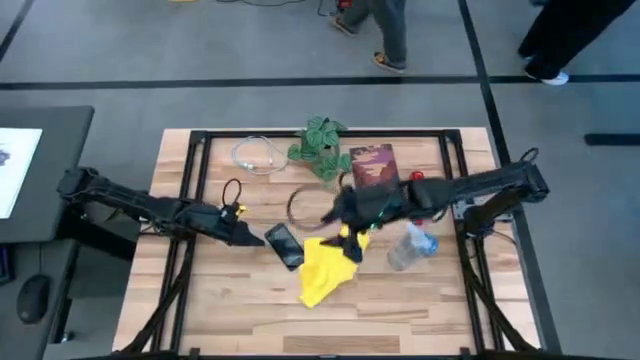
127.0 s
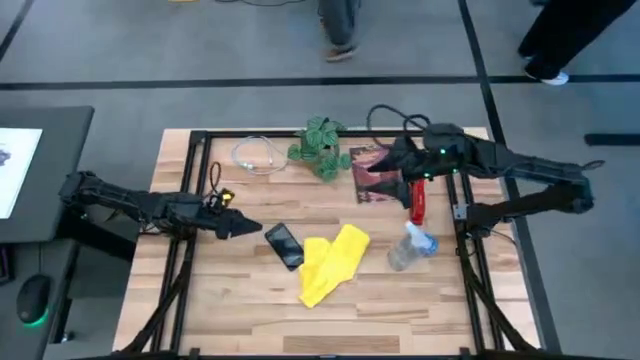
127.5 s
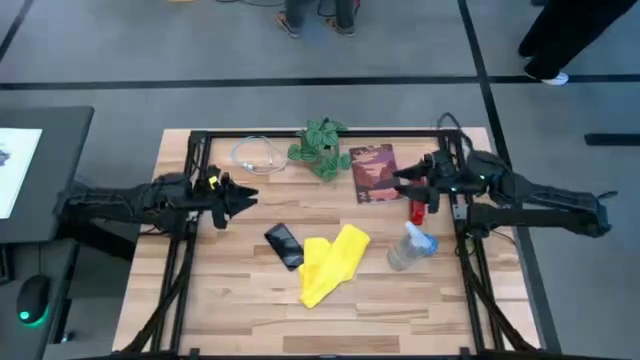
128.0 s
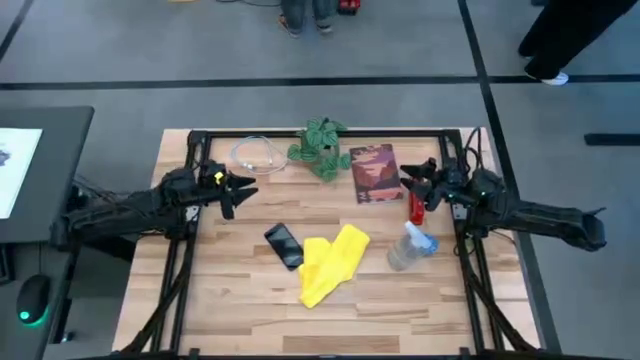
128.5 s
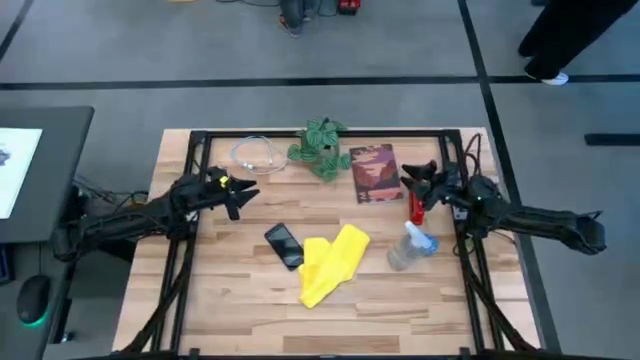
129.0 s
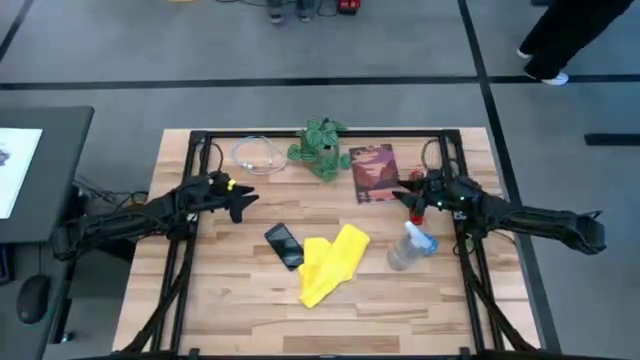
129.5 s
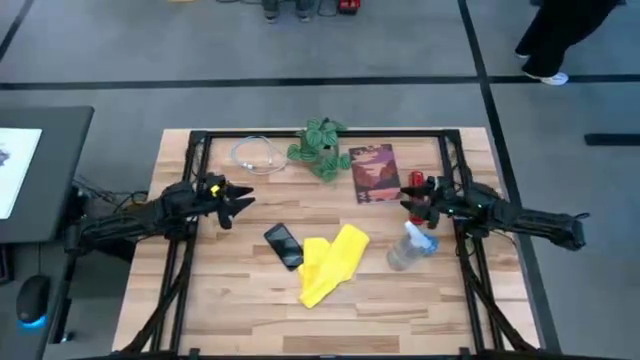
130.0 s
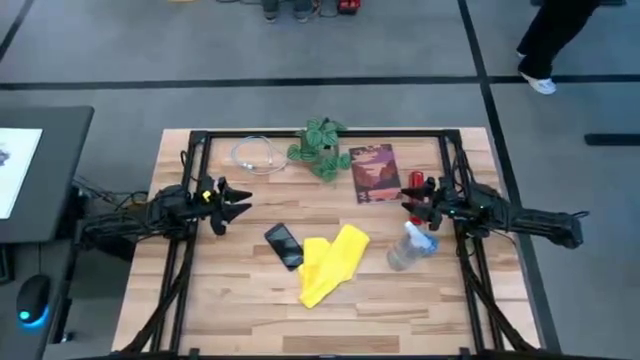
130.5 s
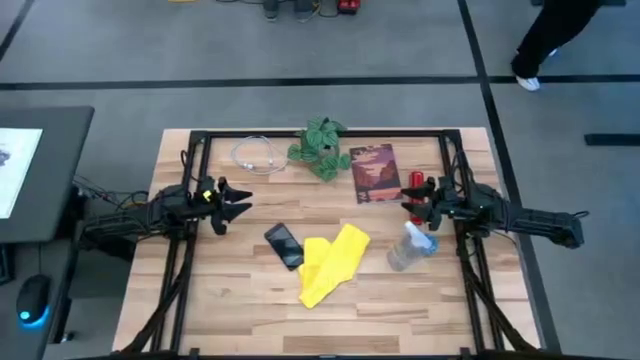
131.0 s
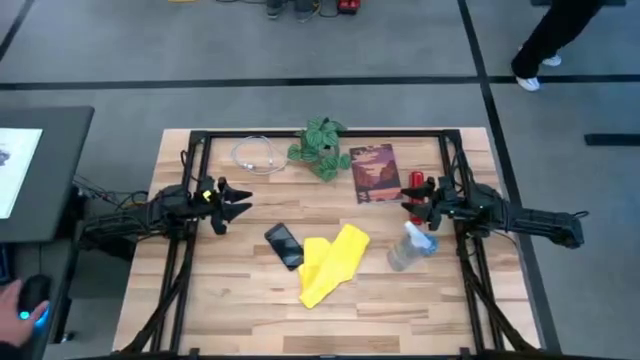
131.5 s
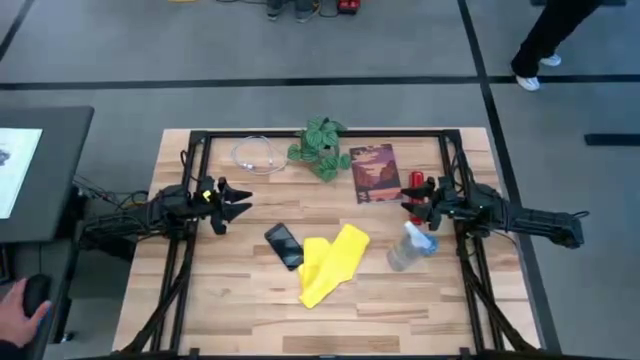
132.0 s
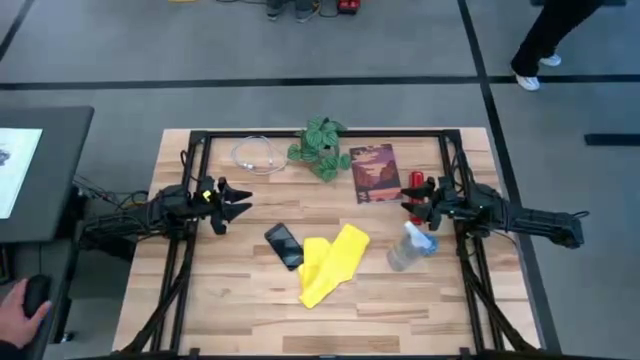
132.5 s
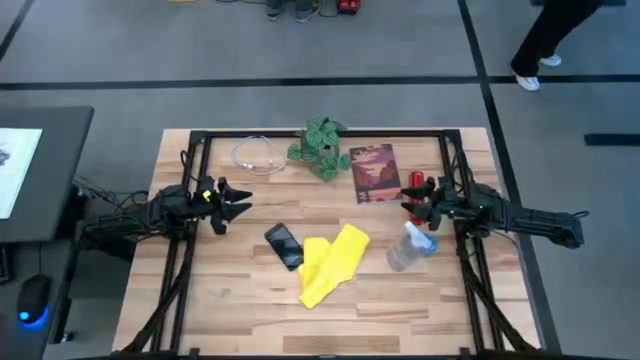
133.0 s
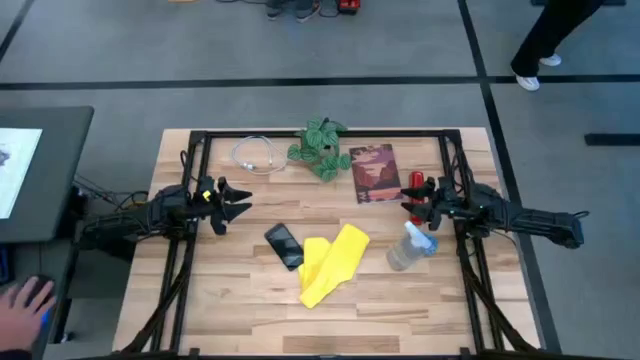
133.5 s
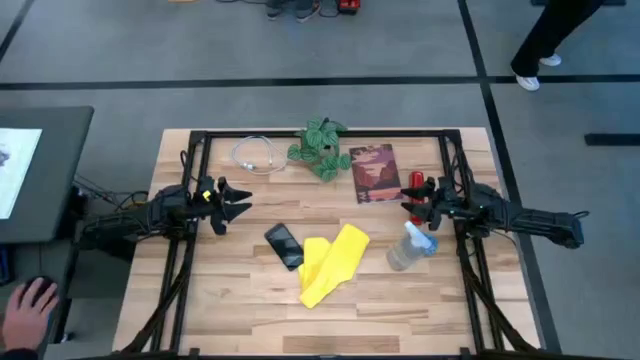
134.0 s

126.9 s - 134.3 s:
Task: Apply microfiber cloth
Return to Home Position

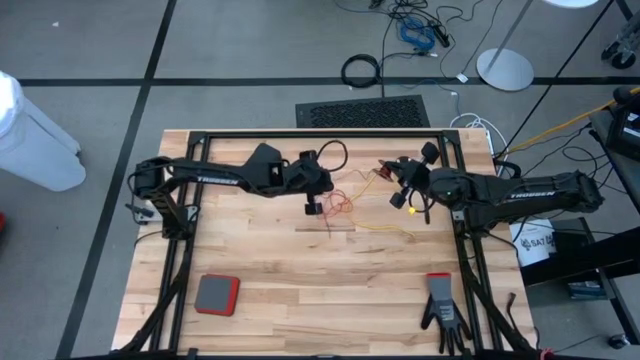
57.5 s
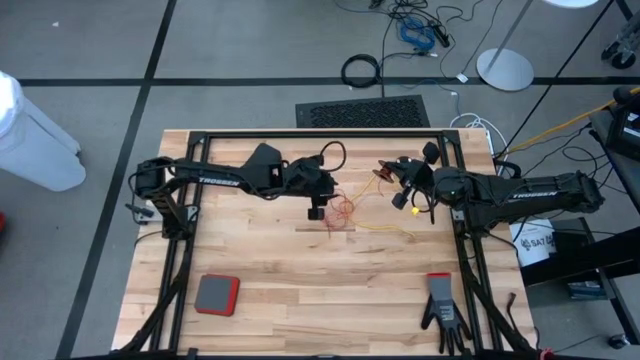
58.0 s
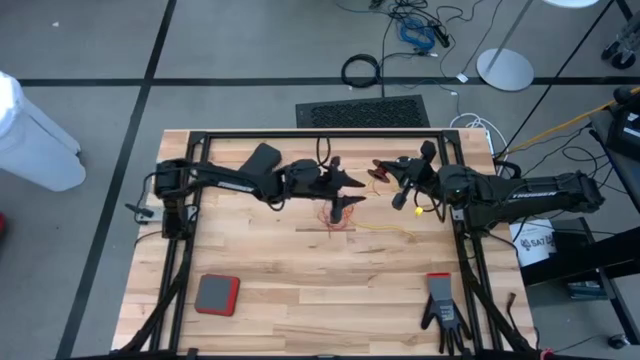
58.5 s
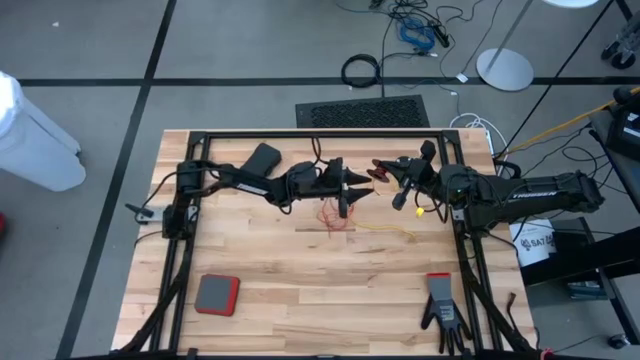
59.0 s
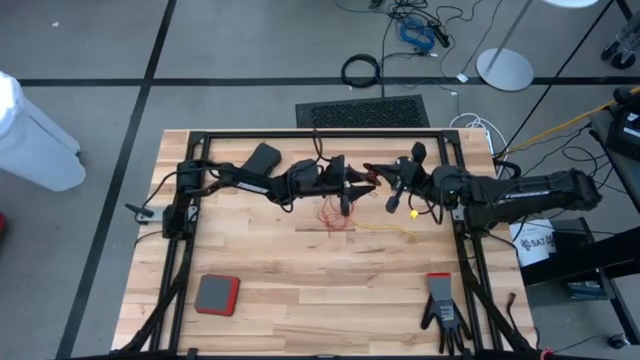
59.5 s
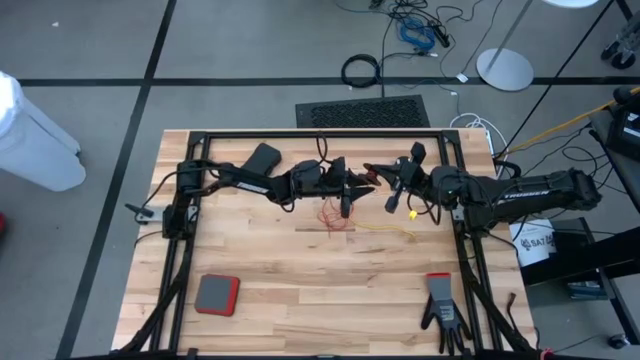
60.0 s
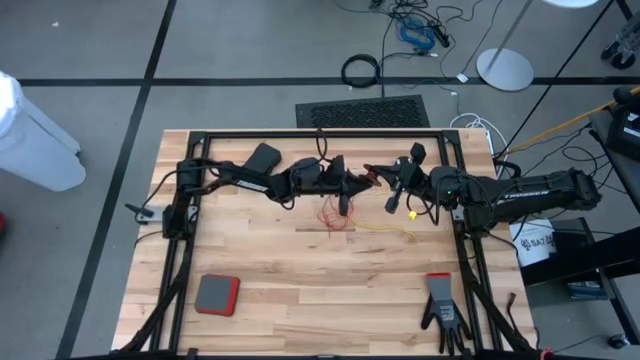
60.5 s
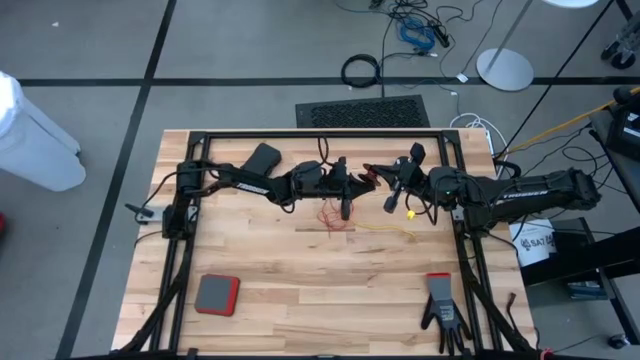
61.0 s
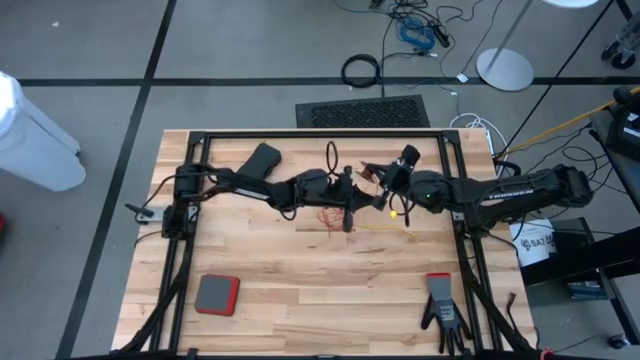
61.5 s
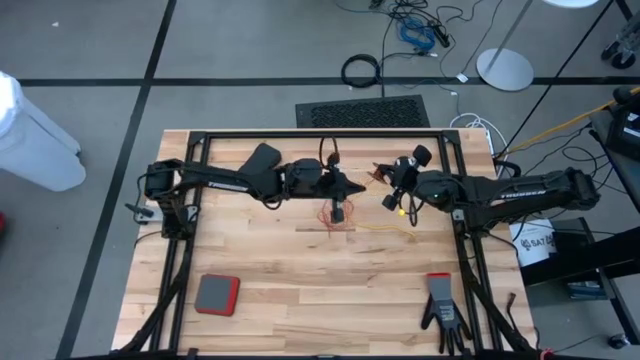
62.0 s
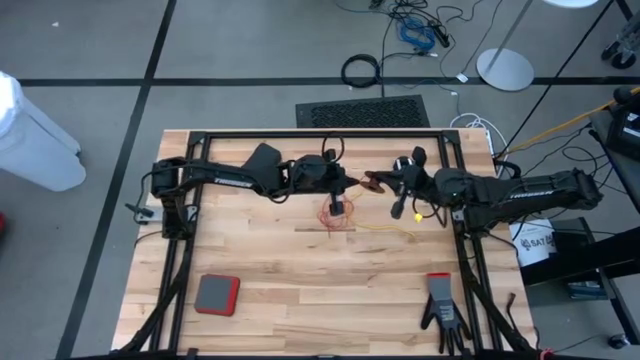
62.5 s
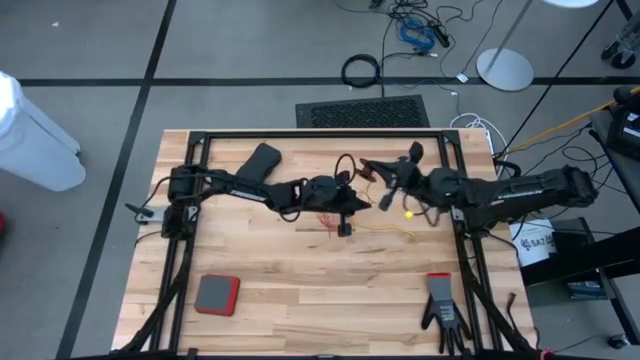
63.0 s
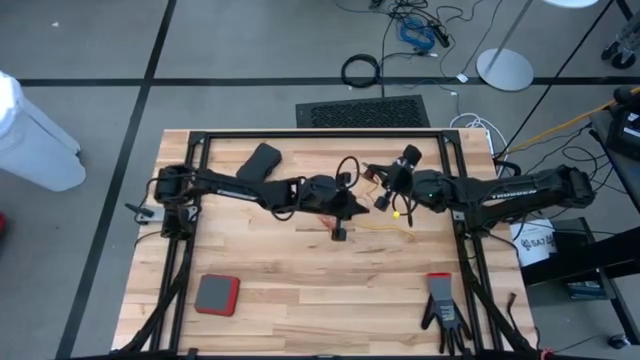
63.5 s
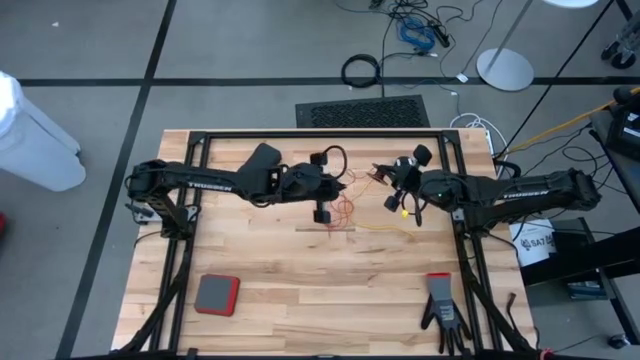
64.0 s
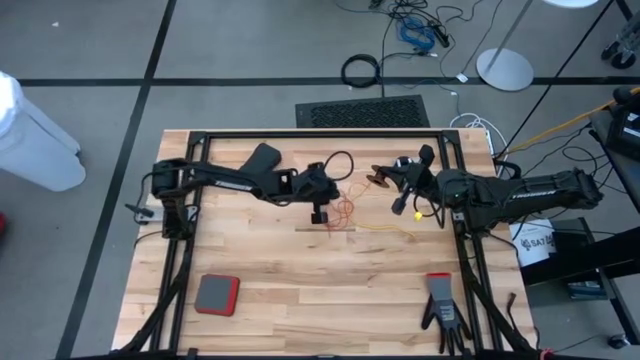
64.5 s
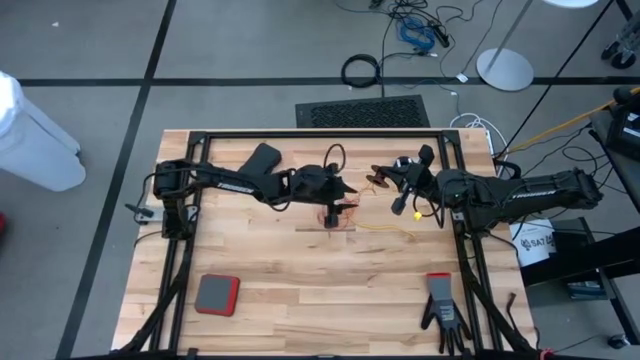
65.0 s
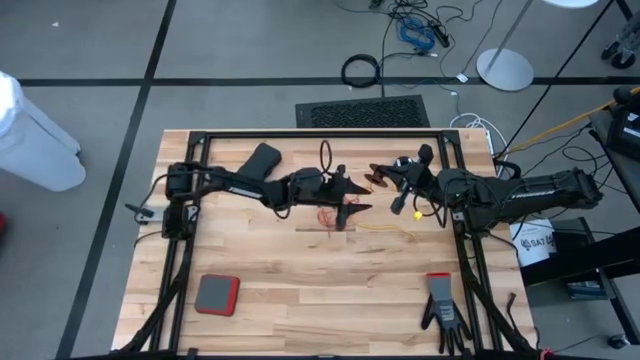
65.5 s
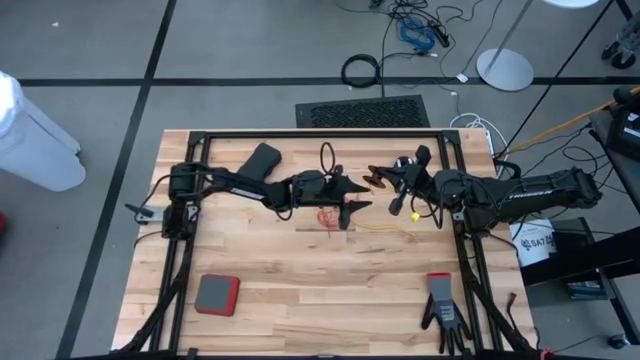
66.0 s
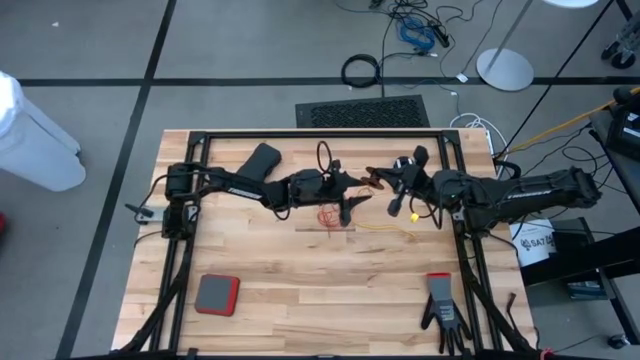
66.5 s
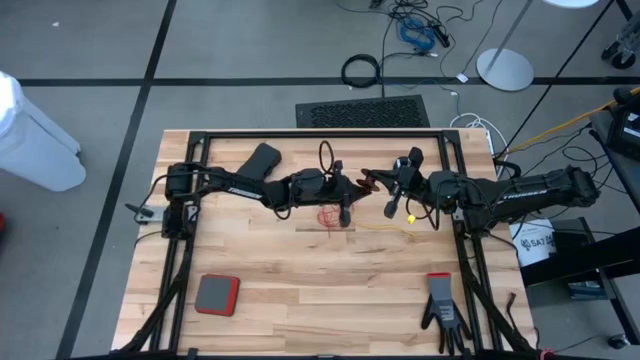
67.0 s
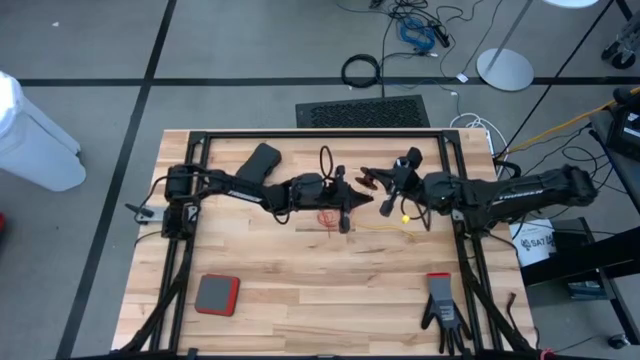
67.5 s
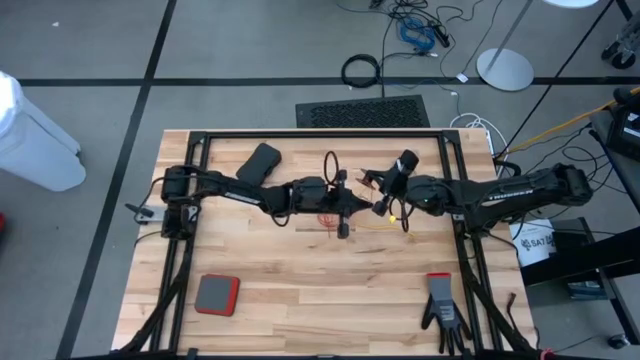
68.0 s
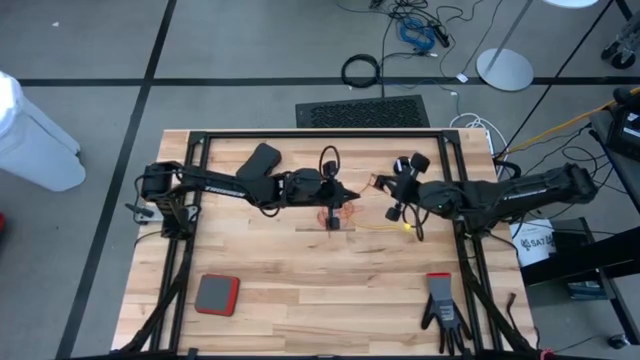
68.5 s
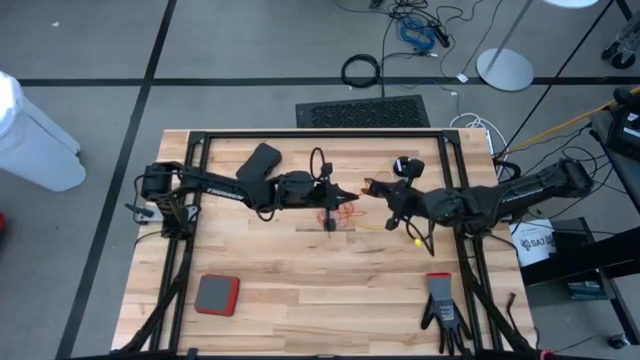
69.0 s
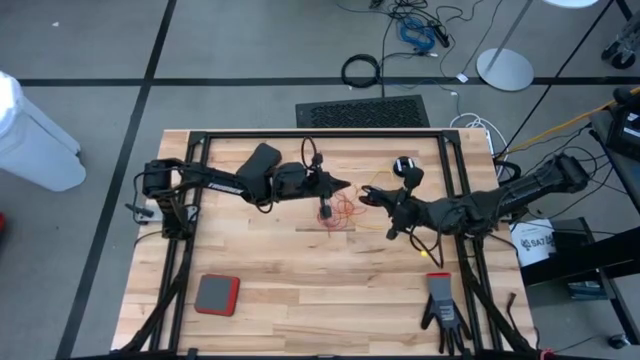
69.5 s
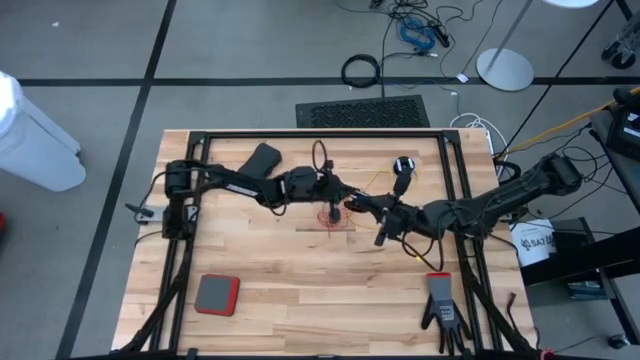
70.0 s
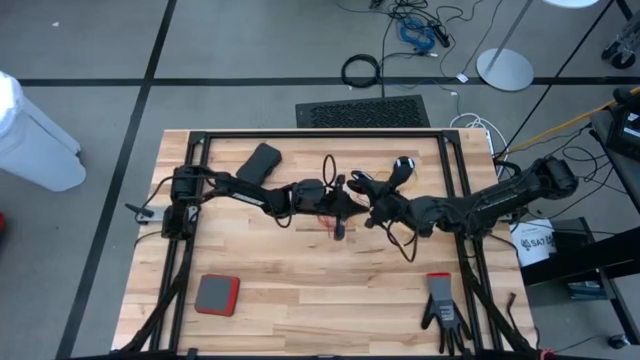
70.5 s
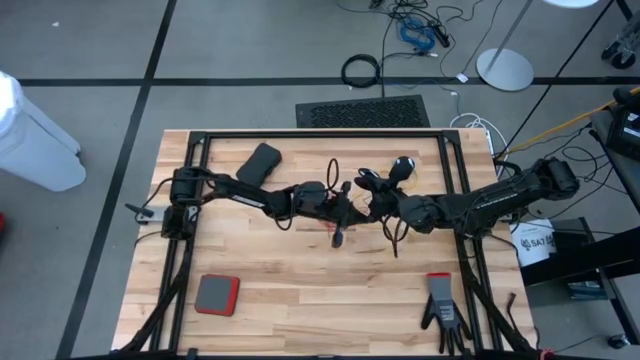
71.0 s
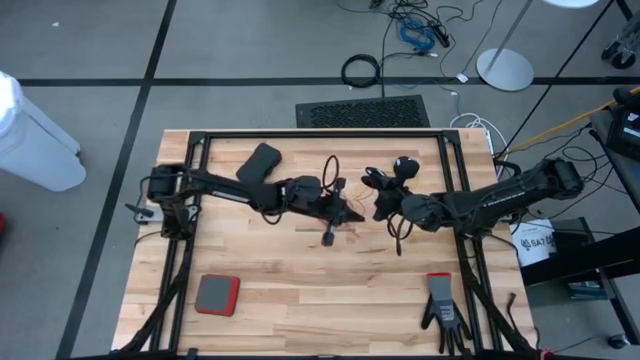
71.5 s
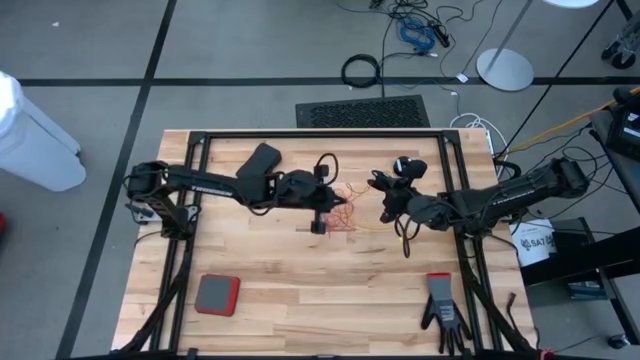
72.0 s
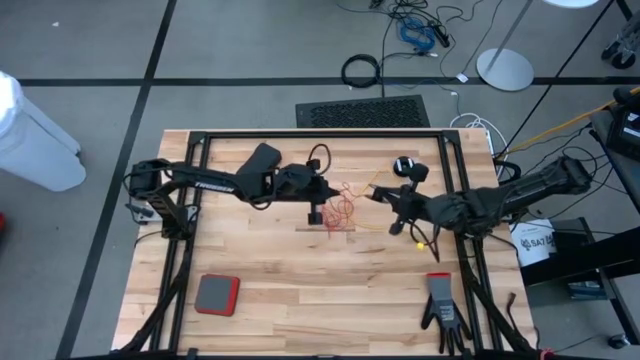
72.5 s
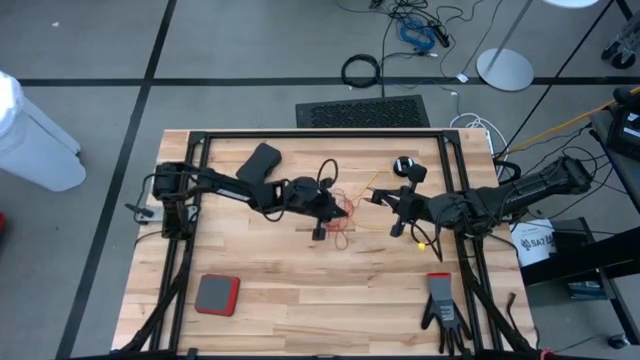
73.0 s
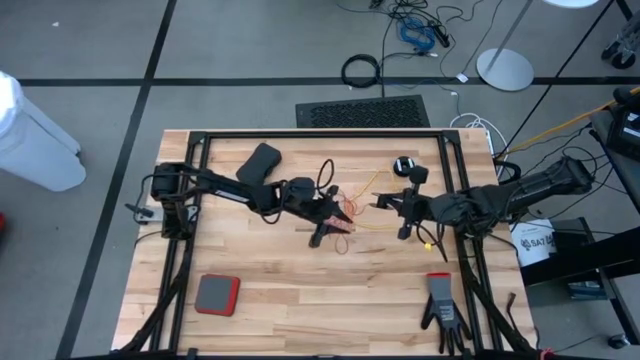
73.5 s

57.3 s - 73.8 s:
Task: Coil cords
Uncoil the red wire from the spool
